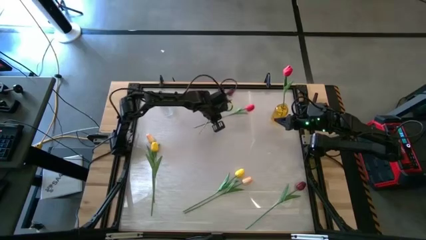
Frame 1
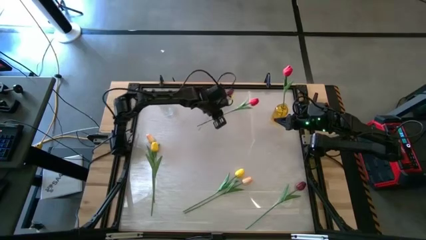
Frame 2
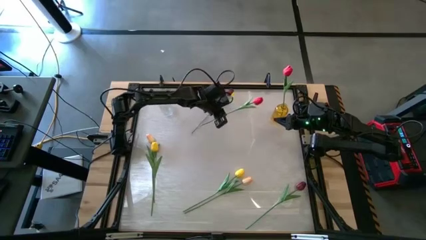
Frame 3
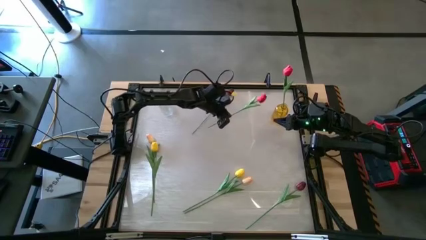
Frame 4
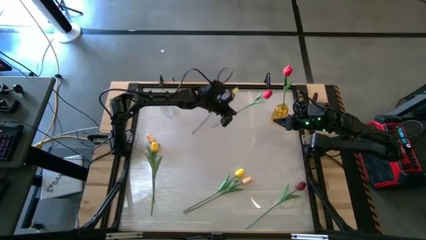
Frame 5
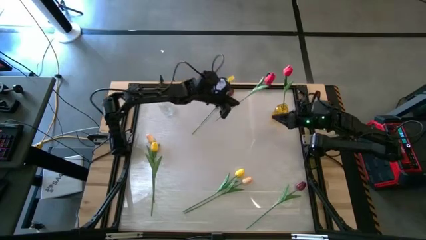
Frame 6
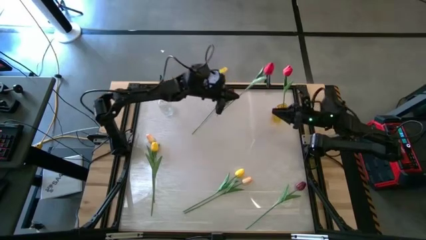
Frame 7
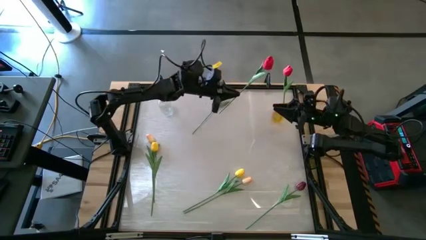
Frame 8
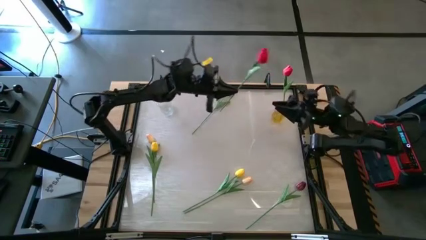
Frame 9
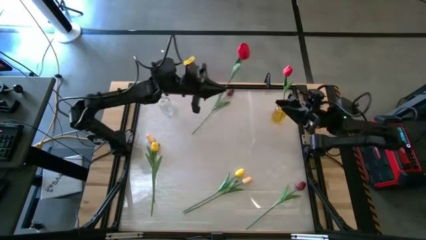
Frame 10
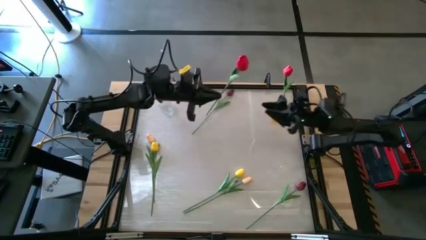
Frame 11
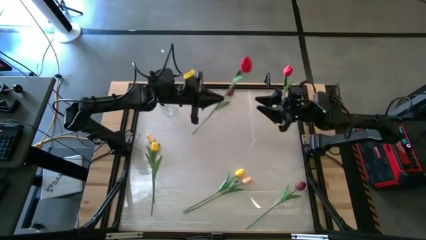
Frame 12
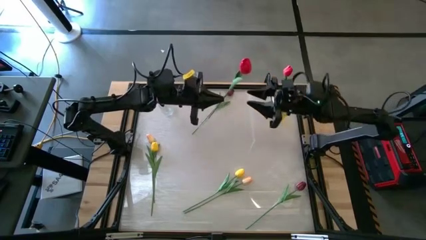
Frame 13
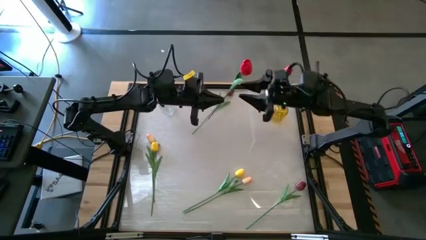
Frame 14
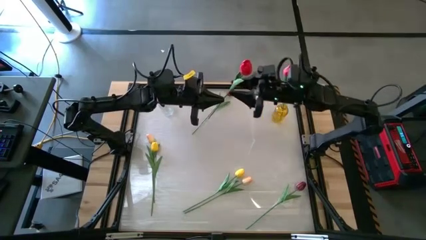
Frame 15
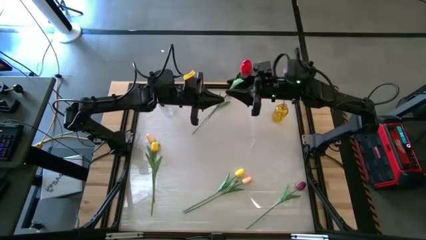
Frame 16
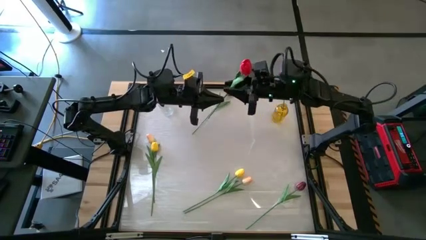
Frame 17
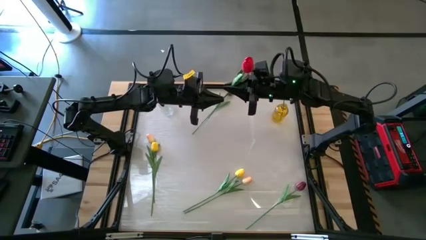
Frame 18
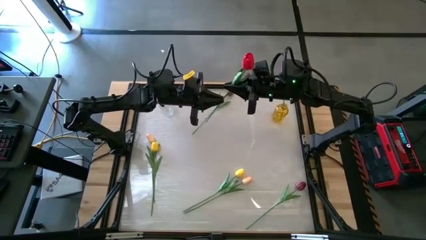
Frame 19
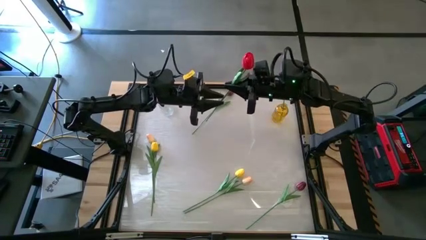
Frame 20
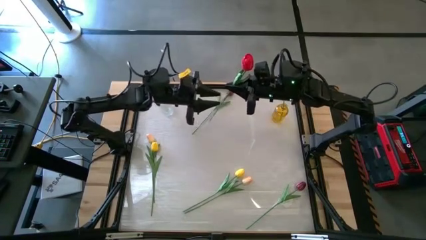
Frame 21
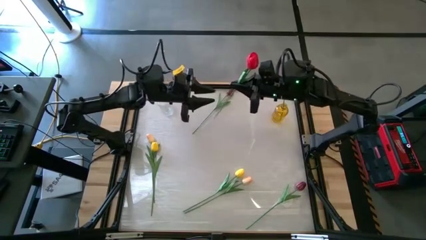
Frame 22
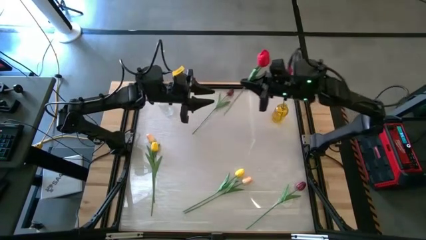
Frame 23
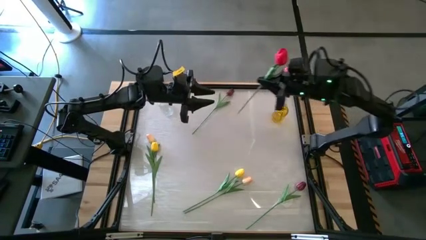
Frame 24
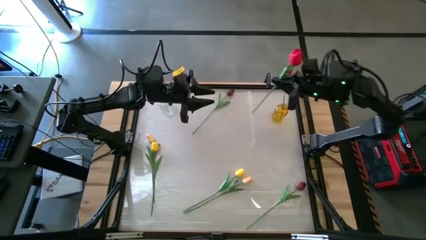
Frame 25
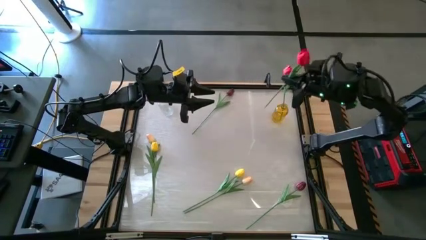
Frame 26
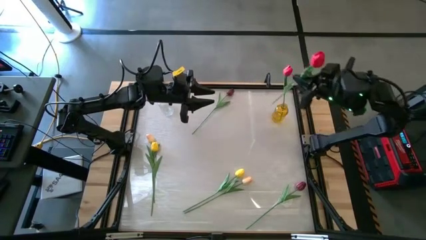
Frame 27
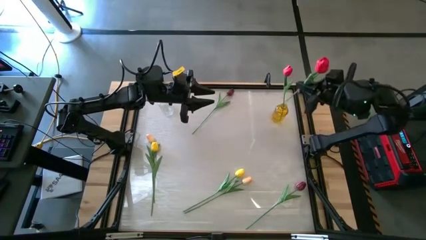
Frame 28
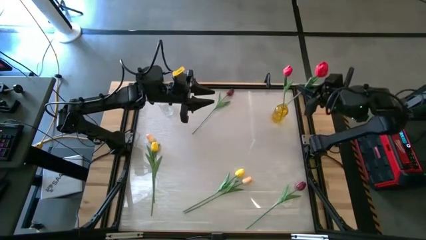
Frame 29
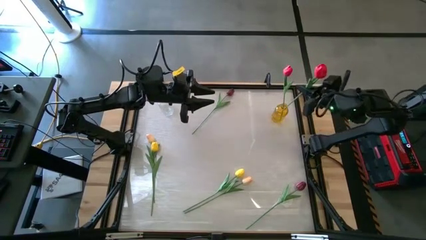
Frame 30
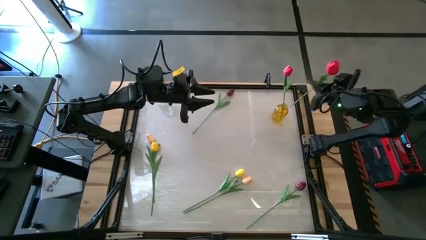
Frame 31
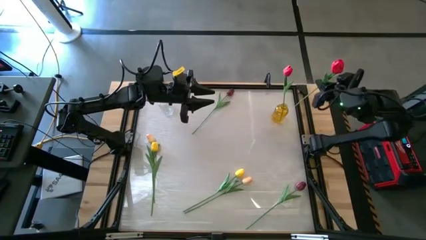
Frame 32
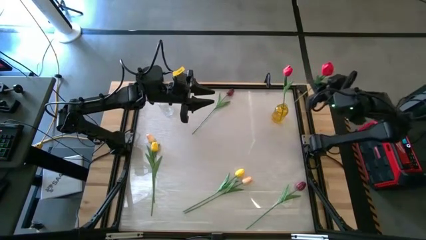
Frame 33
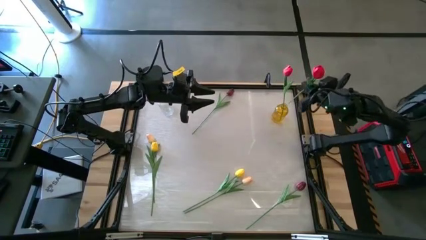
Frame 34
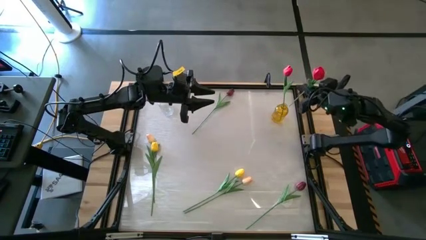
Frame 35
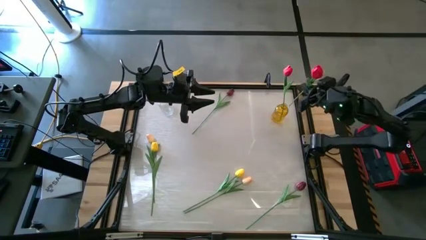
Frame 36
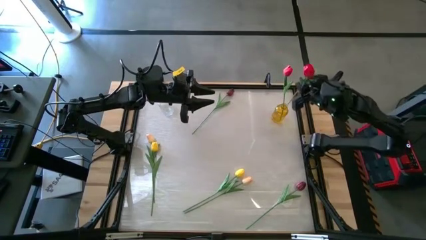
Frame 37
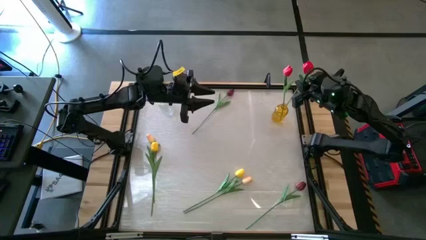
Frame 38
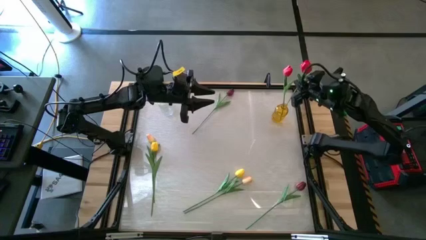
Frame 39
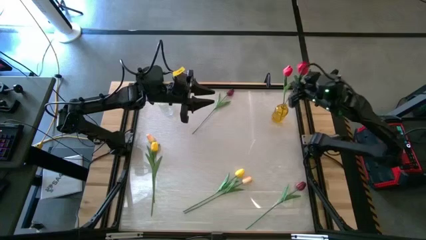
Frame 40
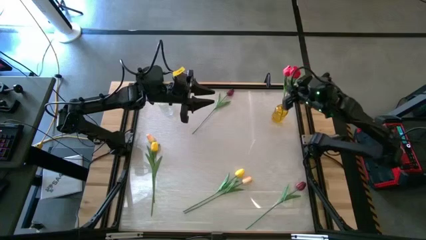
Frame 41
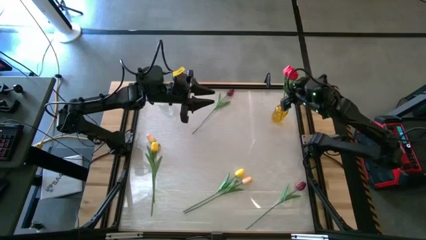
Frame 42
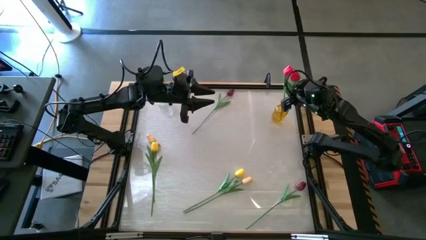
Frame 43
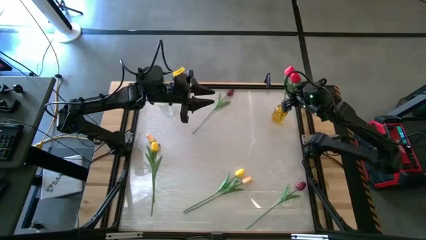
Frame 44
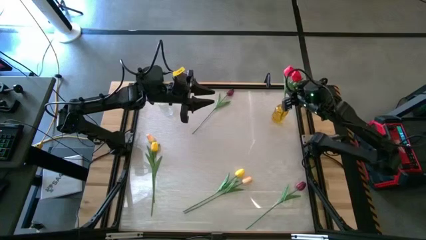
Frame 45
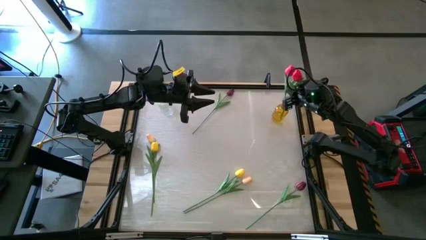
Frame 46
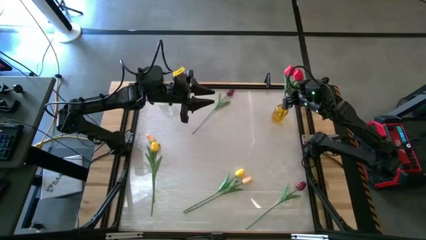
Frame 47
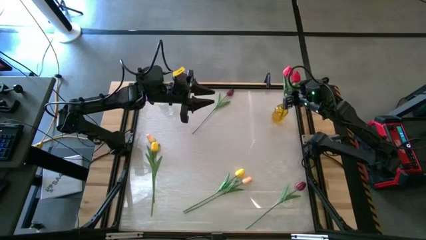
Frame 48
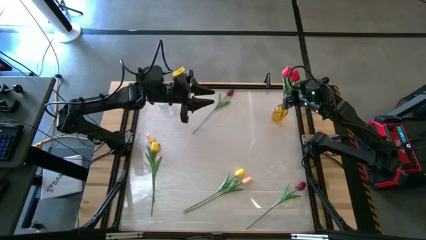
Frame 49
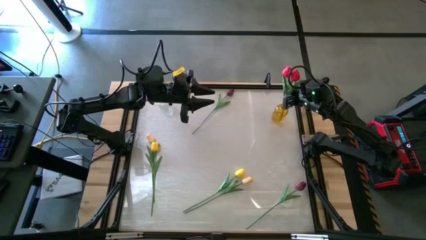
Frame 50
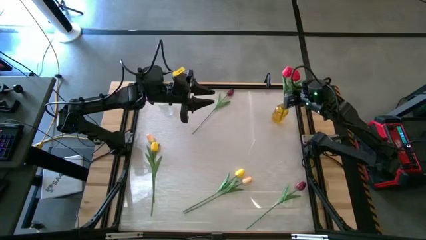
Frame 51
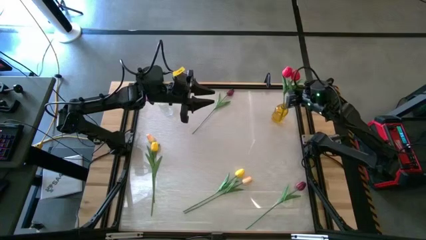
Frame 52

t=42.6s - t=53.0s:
Task: Sort flowers into vase by color
Put the red tulip into the yellow vase

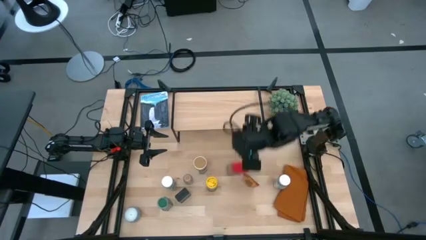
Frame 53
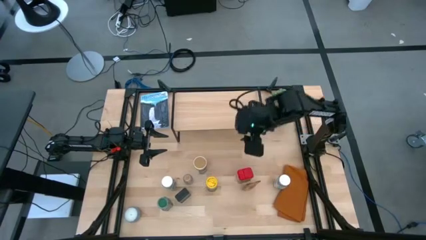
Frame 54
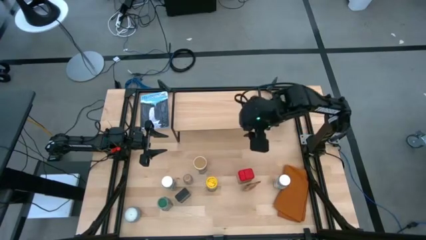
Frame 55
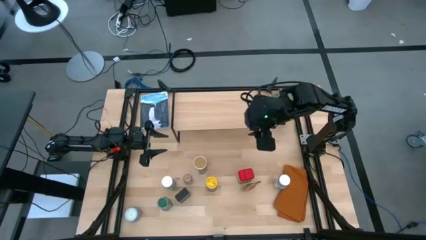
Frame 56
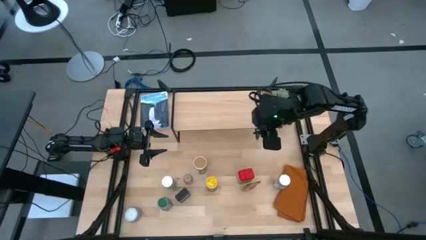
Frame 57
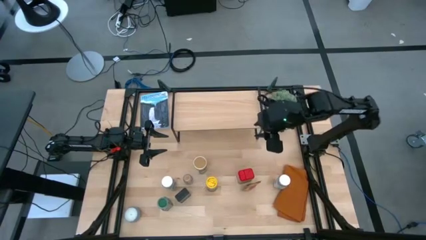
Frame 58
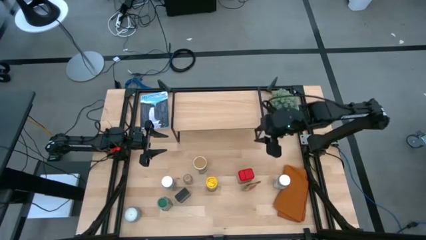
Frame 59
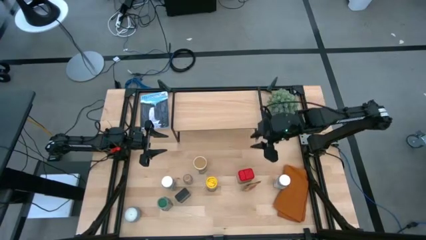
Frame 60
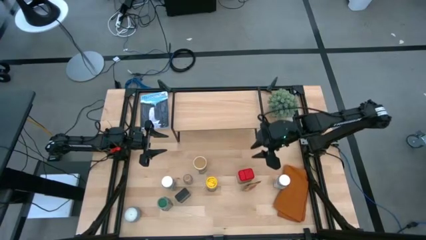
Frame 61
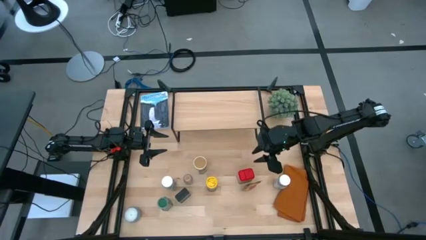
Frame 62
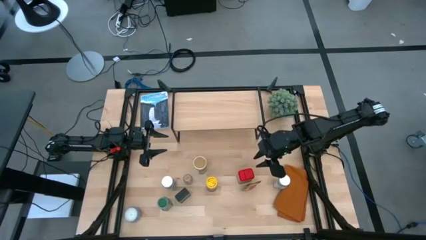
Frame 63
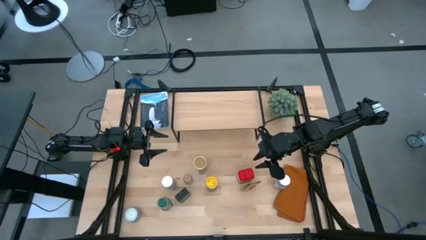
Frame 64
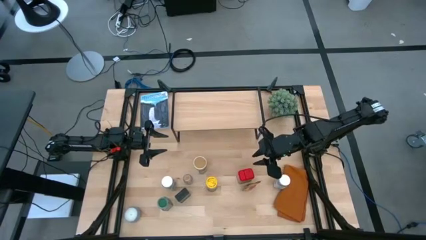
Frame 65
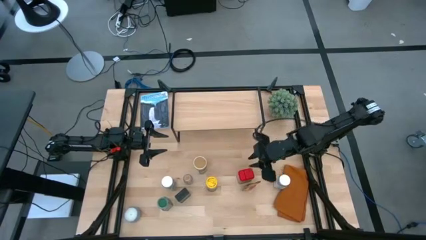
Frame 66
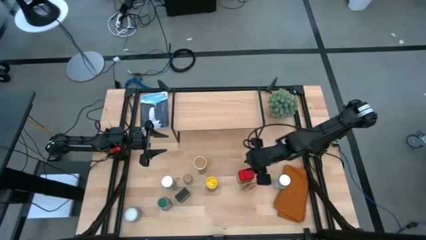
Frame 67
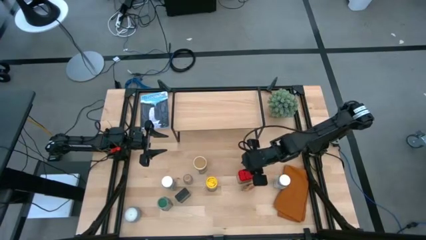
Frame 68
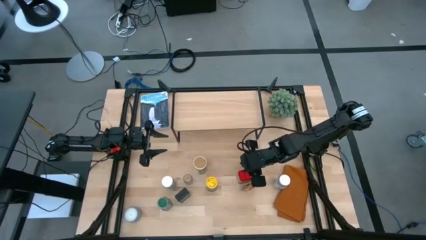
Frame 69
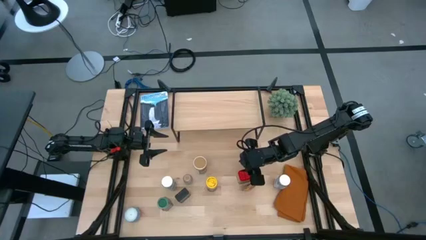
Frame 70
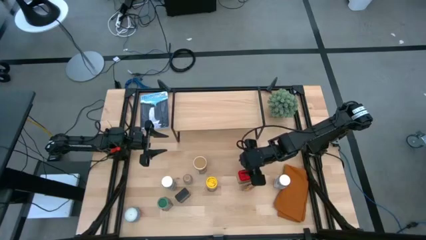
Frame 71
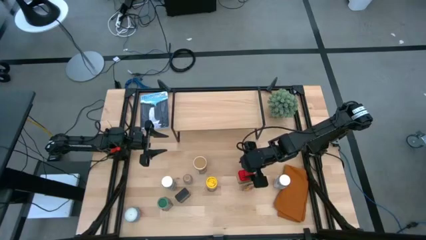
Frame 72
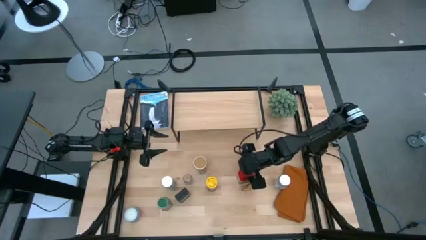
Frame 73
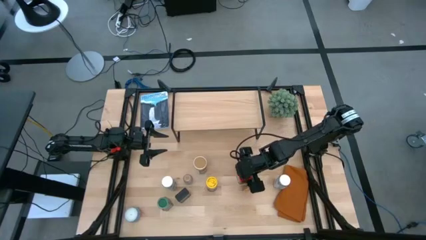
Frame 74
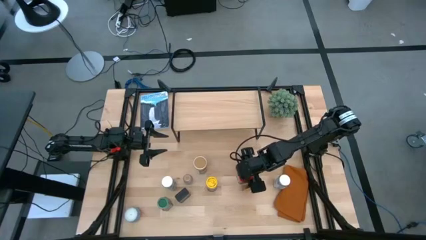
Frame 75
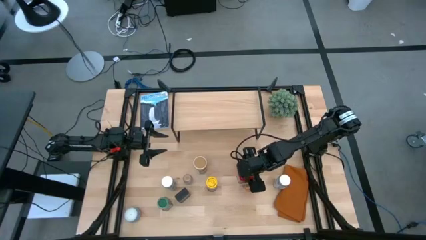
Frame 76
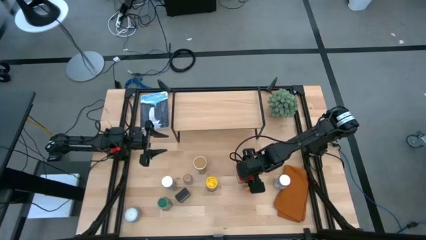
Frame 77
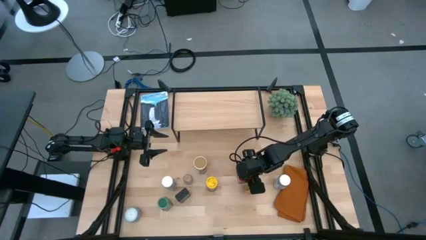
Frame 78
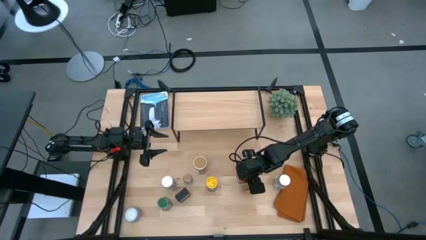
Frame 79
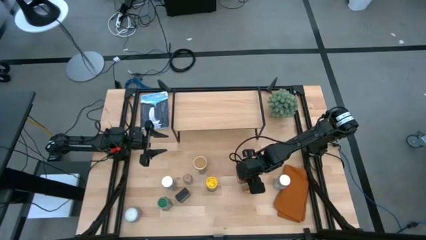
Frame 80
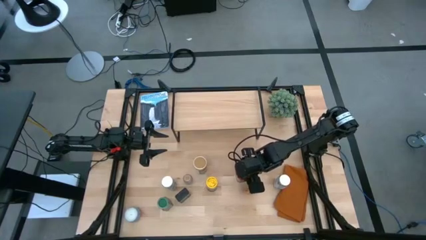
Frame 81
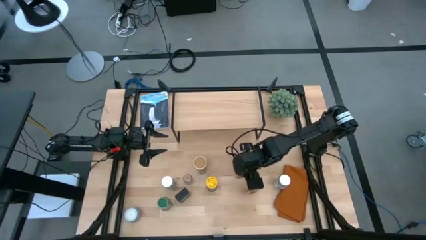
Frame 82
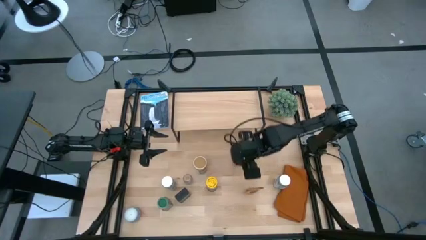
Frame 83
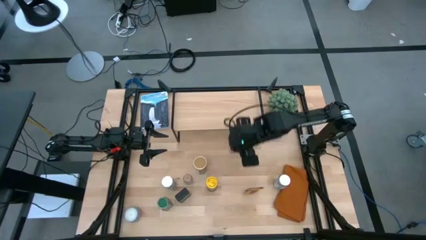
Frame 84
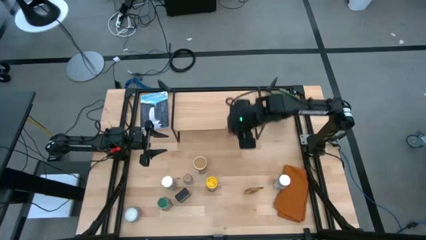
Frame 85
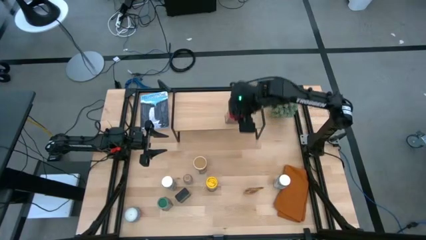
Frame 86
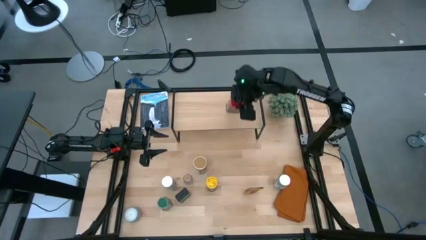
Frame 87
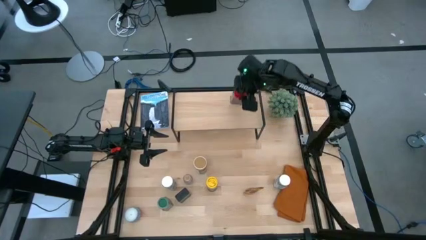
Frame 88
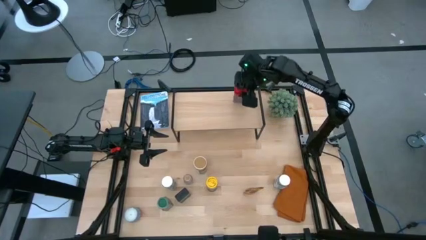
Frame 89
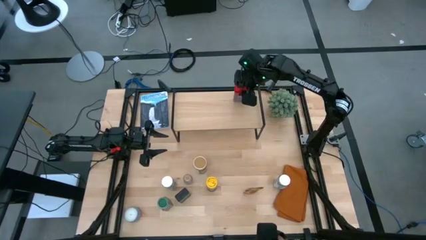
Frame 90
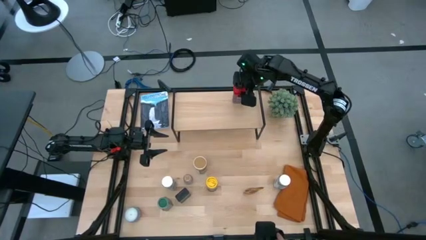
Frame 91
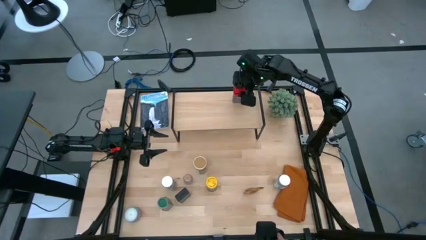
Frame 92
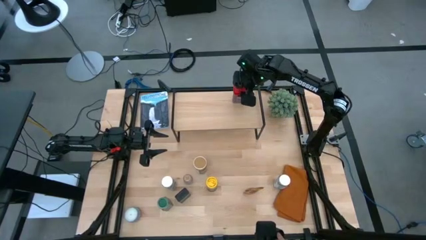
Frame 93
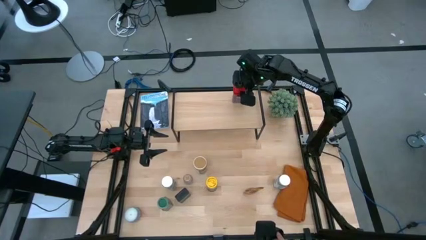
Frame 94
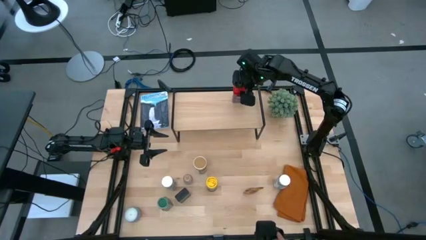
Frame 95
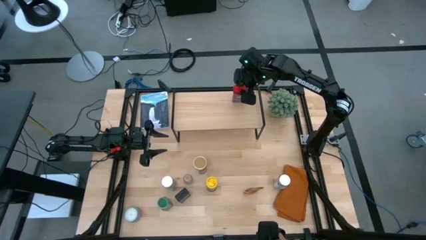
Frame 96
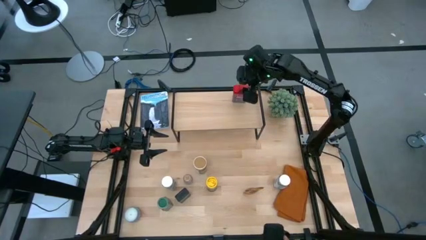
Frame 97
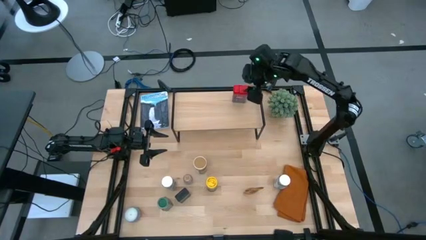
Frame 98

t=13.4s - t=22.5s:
Task: Shelf spices
Put the red seasoning can on the shelf
